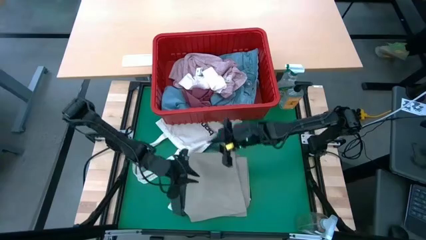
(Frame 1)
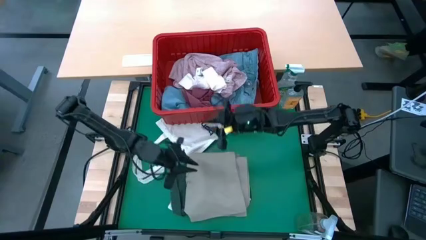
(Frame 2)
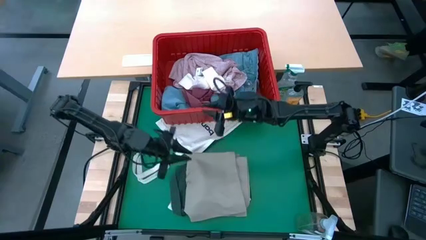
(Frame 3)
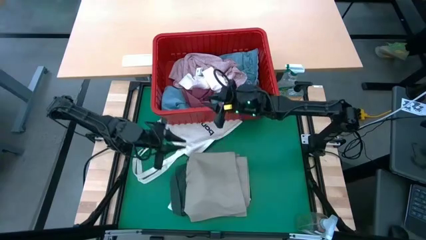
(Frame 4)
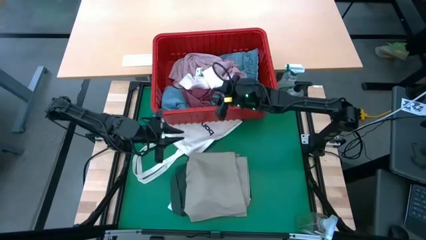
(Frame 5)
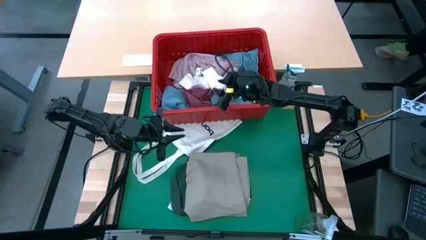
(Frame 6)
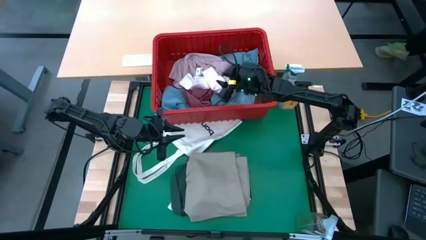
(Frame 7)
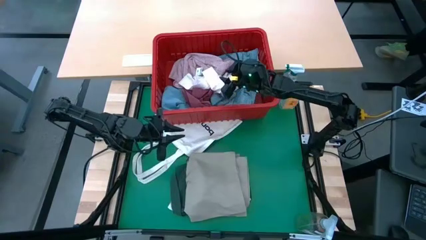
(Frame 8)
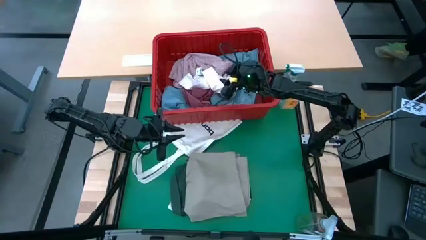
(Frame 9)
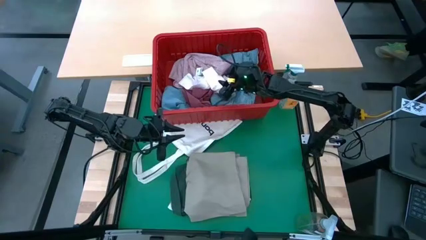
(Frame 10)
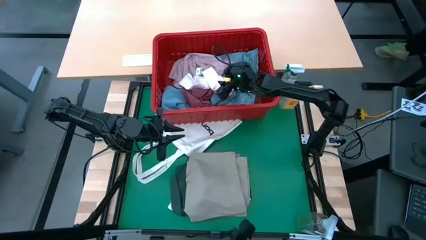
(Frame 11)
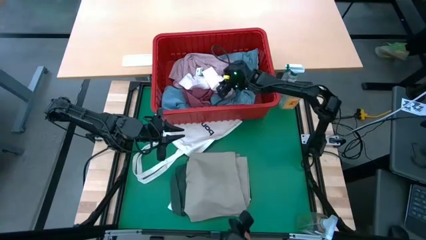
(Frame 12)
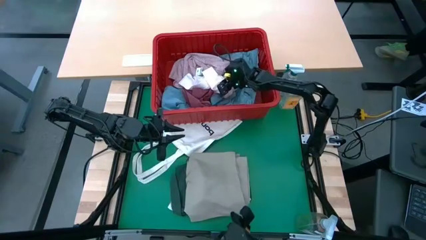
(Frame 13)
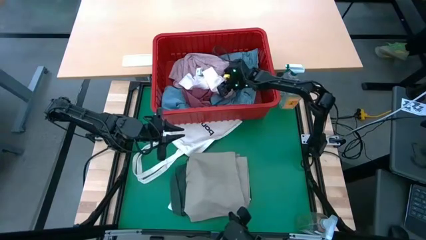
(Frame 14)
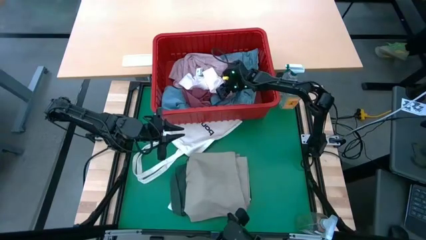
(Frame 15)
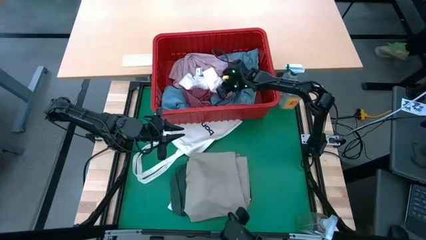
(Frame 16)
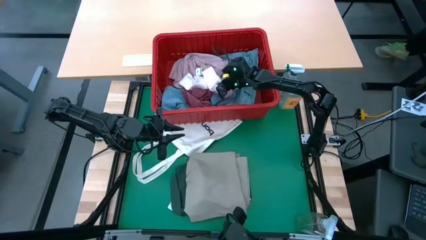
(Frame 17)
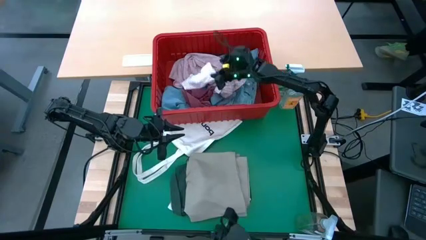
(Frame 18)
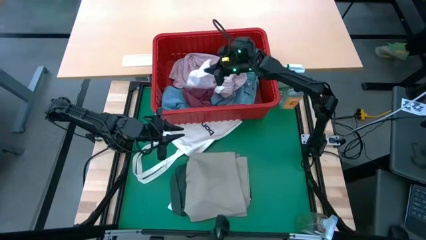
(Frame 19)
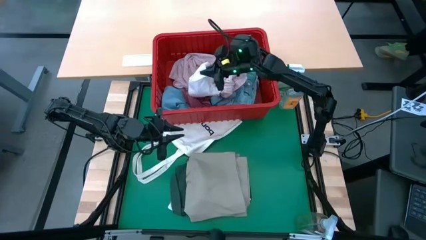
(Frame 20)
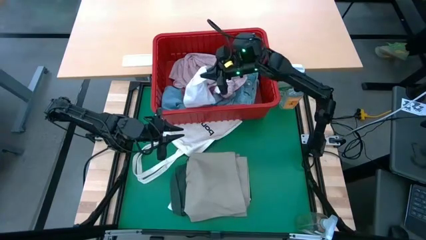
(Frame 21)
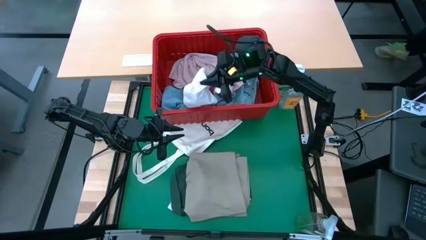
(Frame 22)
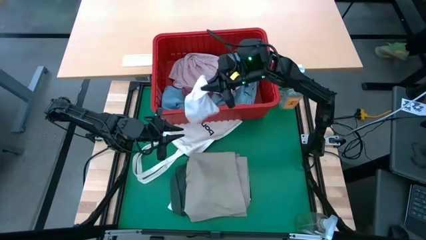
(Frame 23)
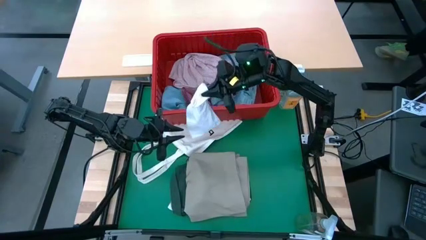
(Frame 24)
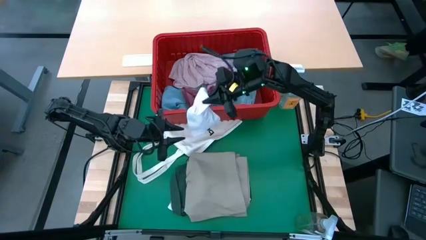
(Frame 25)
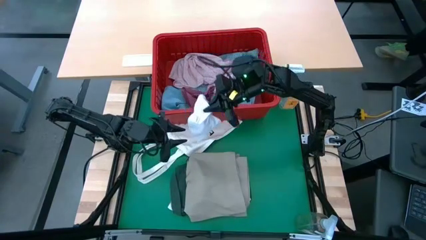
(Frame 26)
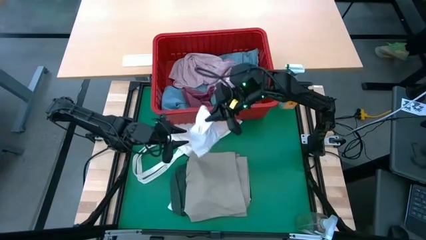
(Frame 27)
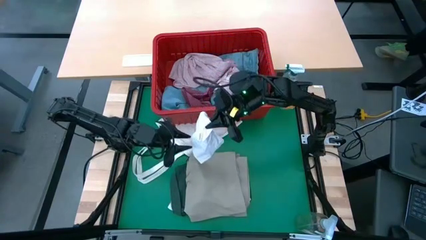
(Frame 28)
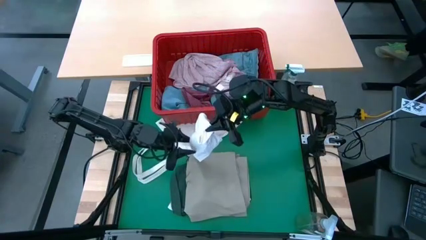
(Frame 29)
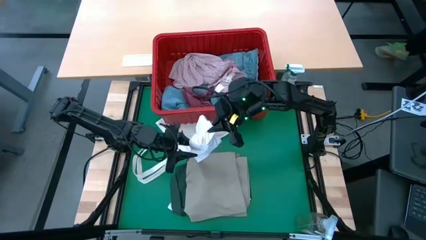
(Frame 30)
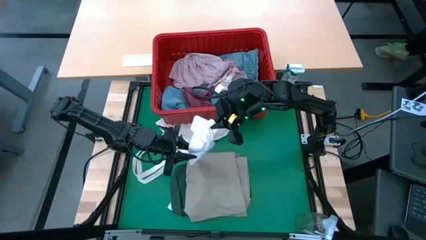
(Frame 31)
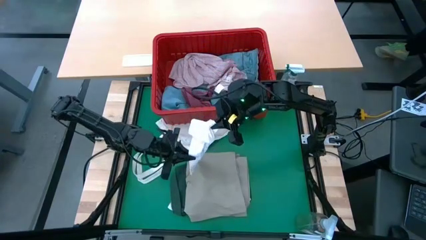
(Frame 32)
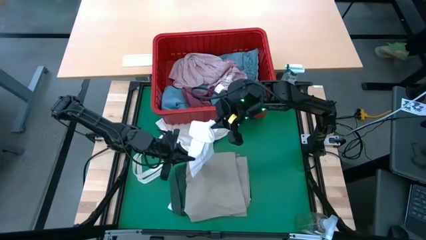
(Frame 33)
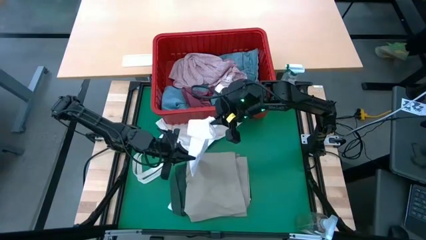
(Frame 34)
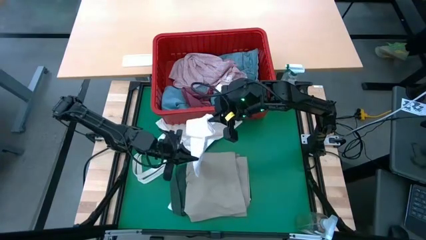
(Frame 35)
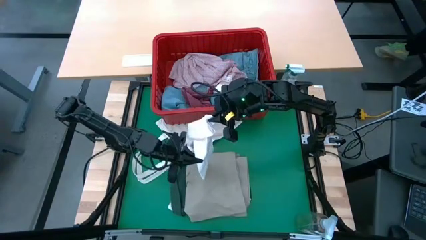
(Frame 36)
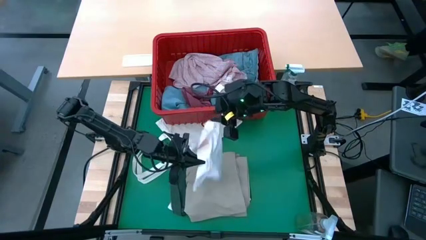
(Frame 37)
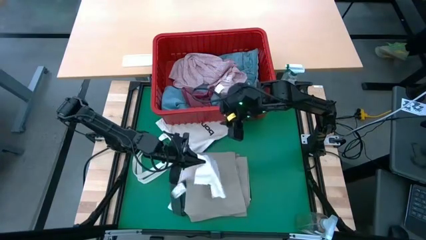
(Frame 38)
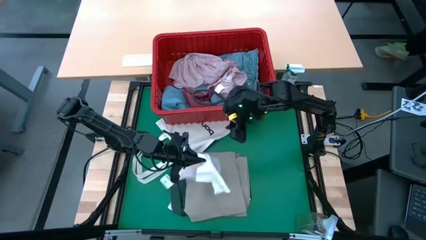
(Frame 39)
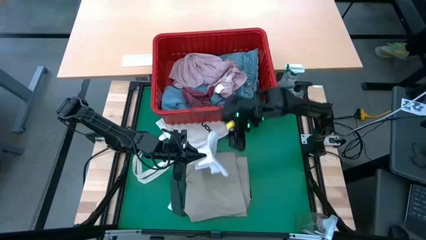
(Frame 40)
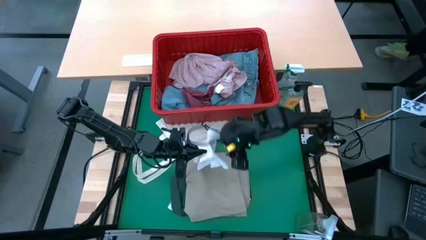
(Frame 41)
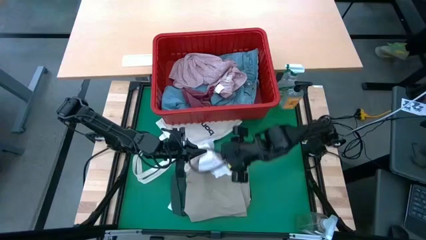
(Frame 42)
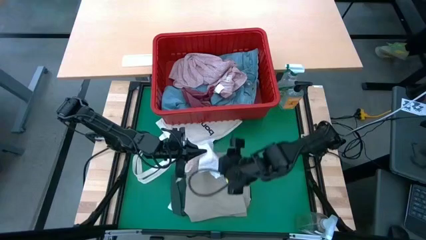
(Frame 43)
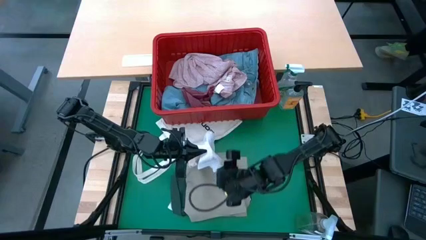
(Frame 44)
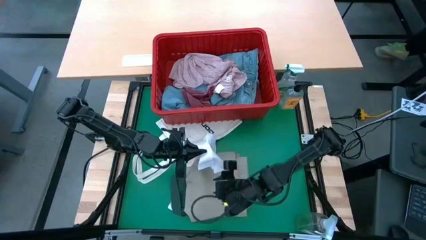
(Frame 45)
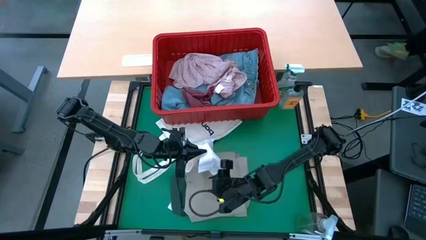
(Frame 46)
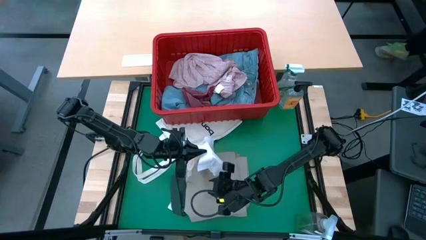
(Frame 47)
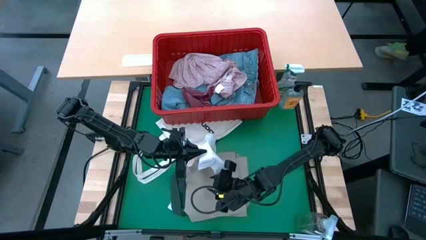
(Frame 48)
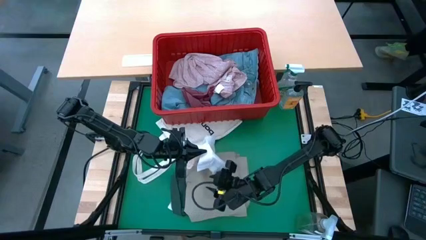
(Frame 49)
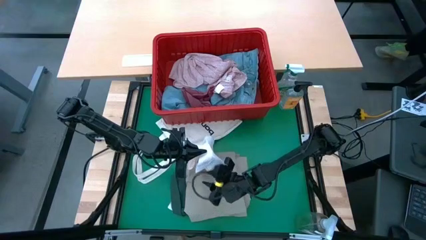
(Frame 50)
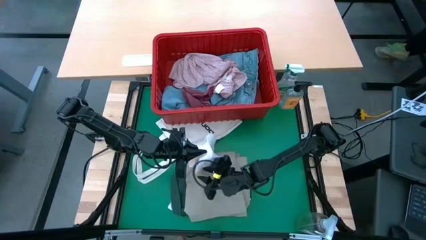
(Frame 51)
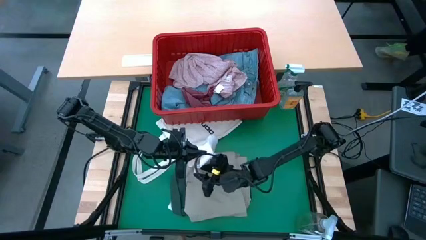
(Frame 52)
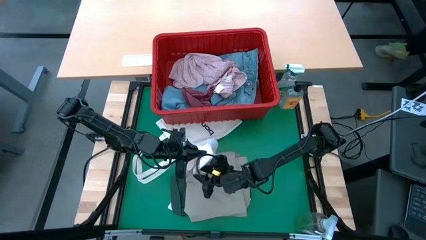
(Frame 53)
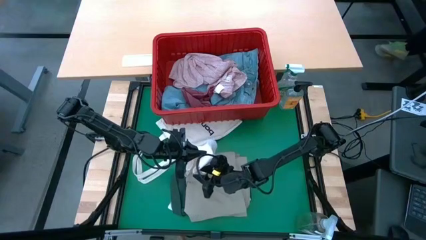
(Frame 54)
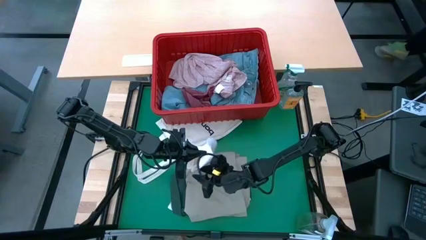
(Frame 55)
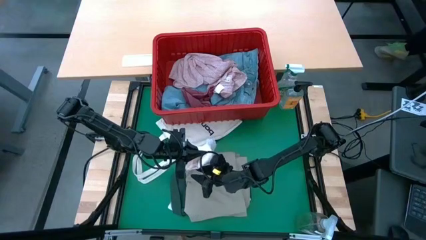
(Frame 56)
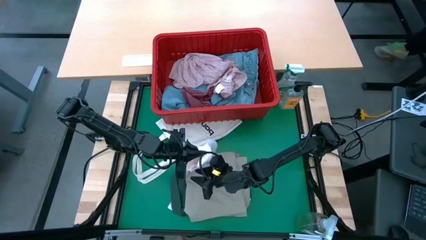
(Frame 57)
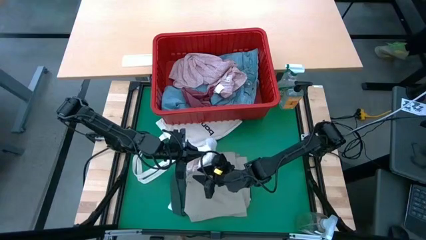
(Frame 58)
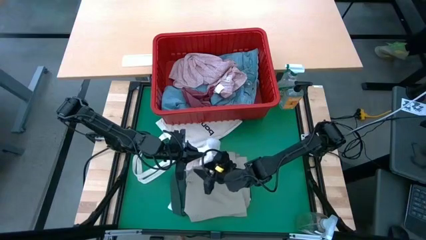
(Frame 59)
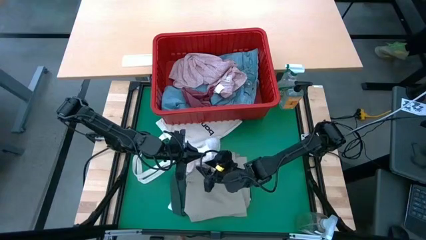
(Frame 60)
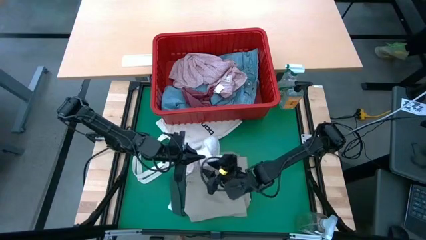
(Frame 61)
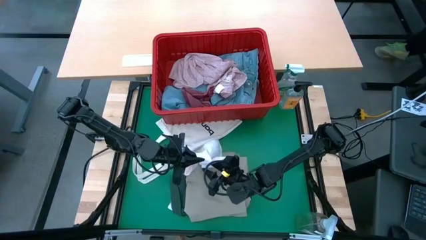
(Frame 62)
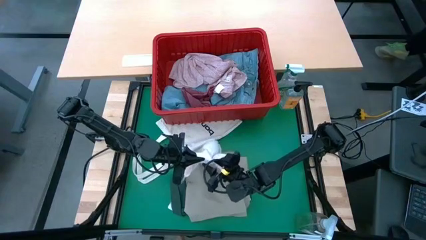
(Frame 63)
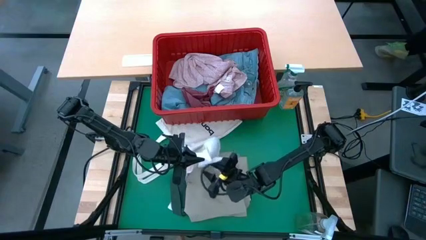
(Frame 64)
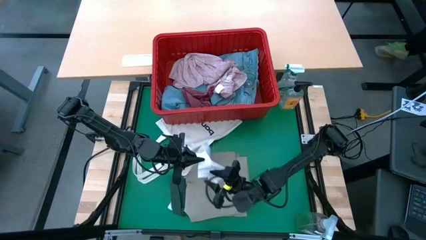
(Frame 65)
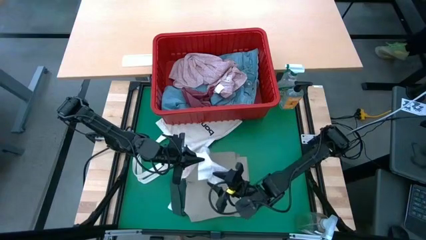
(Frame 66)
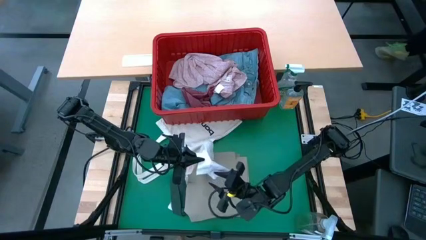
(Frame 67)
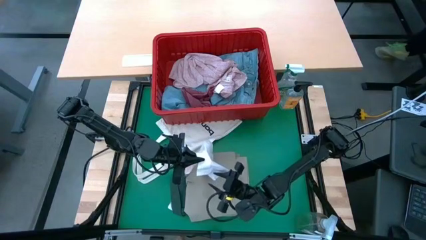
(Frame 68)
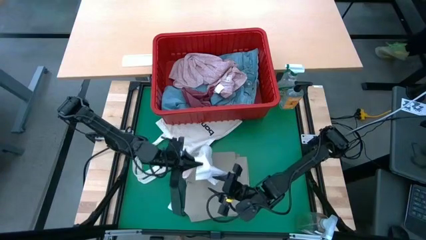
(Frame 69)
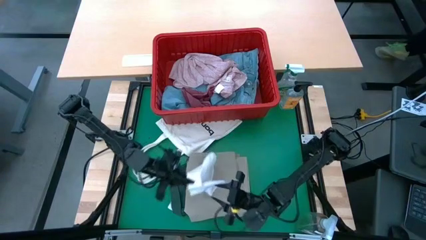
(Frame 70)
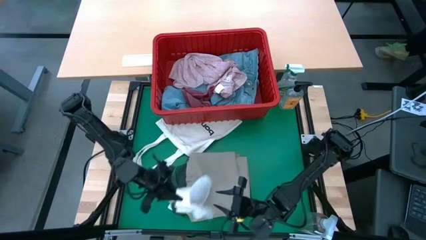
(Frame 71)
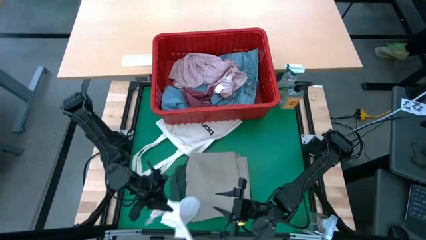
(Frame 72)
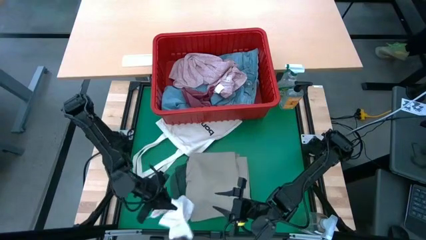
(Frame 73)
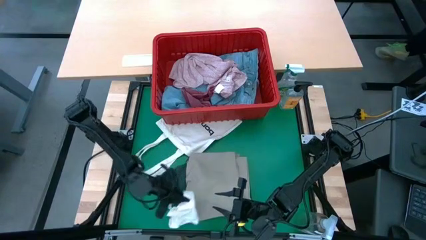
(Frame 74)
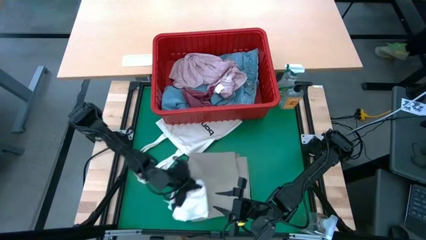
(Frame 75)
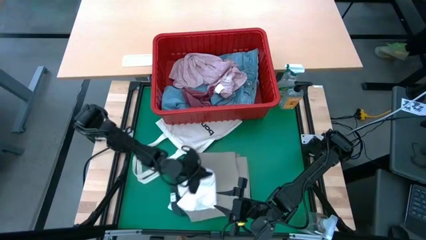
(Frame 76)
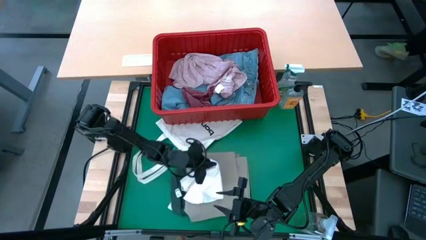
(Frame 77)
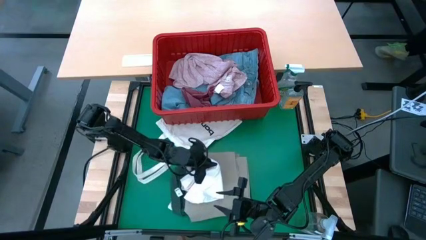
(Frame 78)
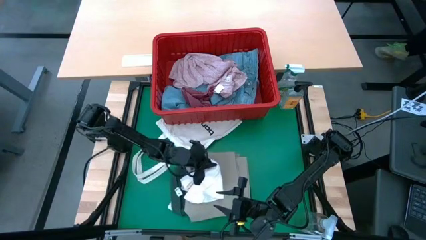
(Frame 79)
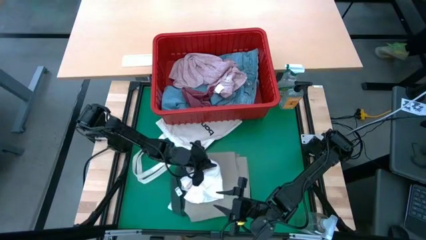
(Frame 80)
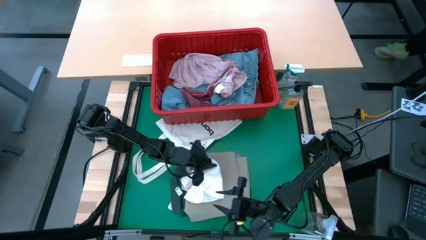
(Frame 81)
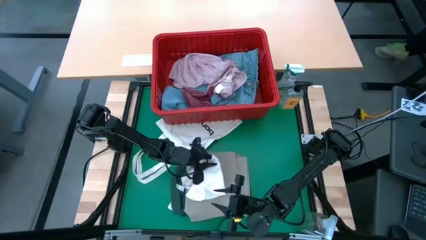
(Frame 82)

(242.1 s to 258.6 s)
Task: Fold laundry
Fold the pink panty

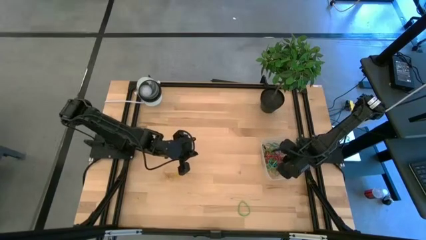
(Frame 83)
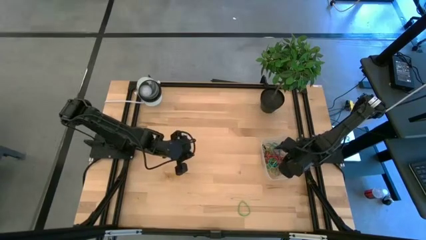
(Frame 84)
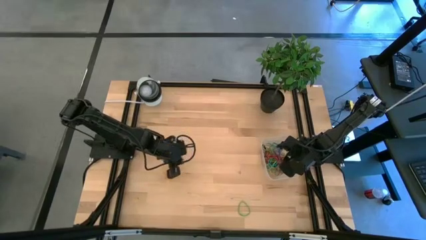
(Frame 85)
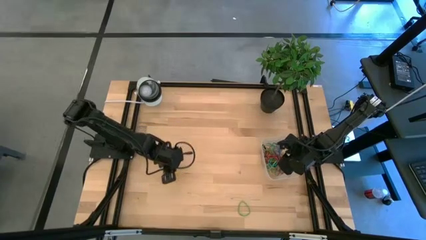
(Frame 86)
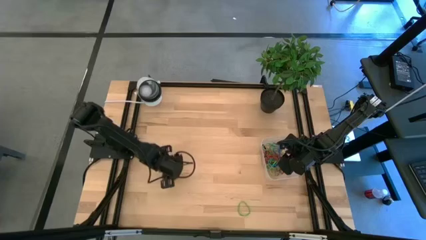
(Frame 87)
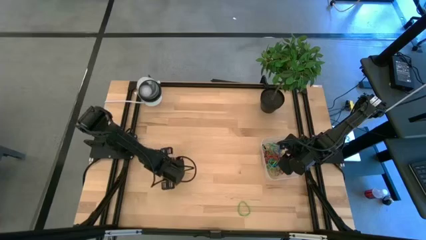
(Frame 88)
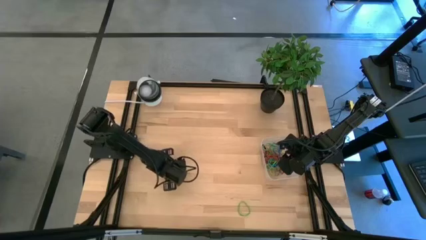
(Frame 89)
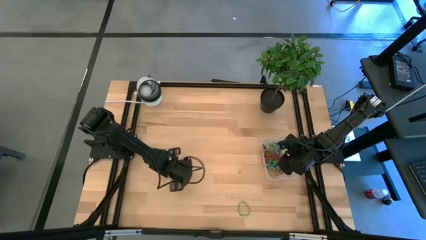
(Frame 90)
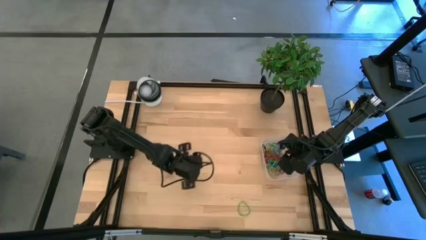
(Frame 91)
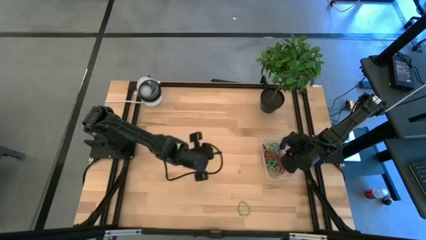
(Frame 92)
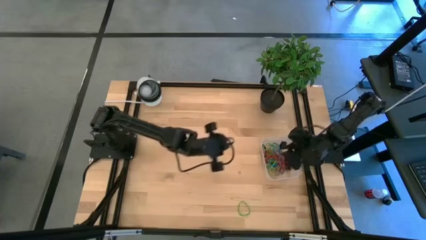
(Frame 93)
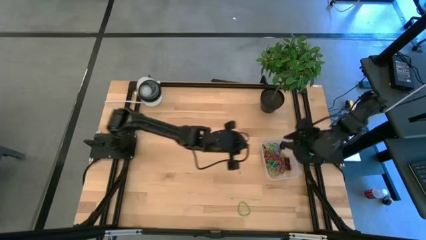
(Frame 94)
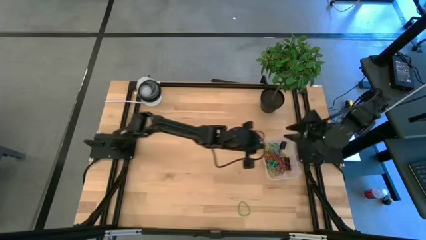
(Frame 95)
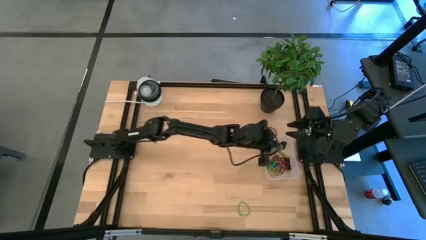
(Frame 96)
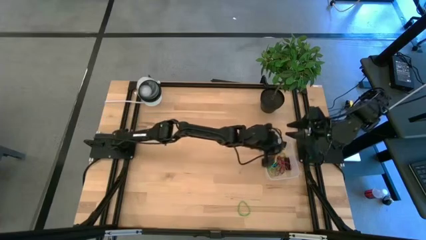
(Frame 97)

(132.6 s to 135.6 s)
Task: Pick and place rubber bands into bin
Put the yellow rubber band into the transparent bin
